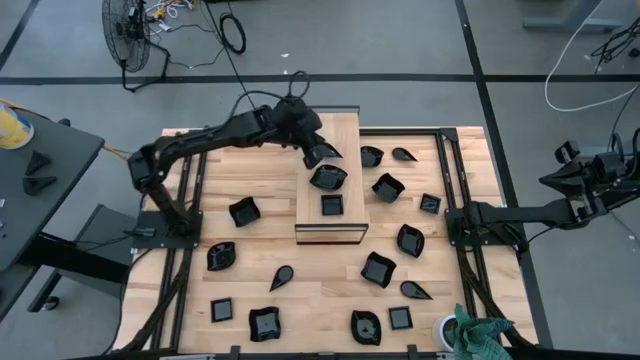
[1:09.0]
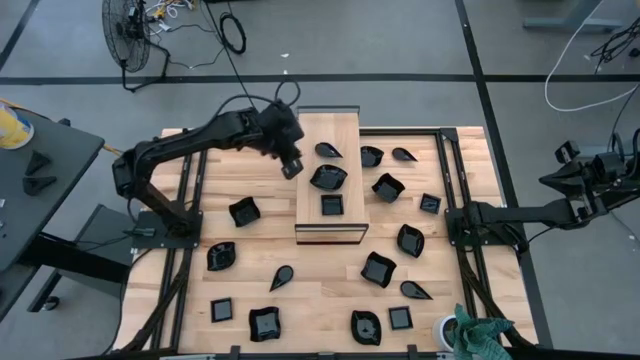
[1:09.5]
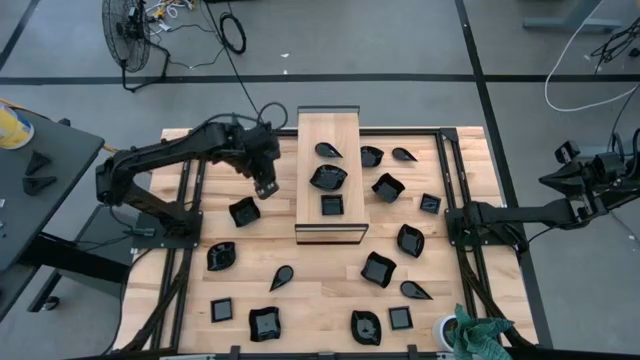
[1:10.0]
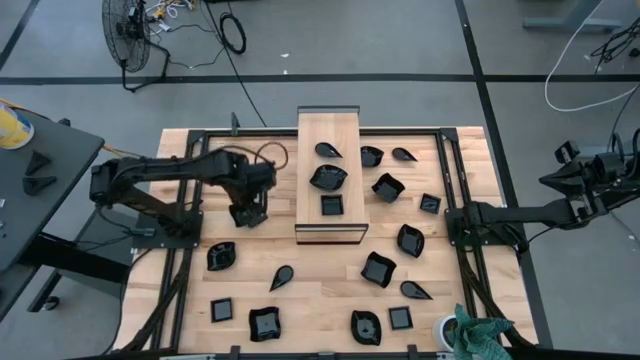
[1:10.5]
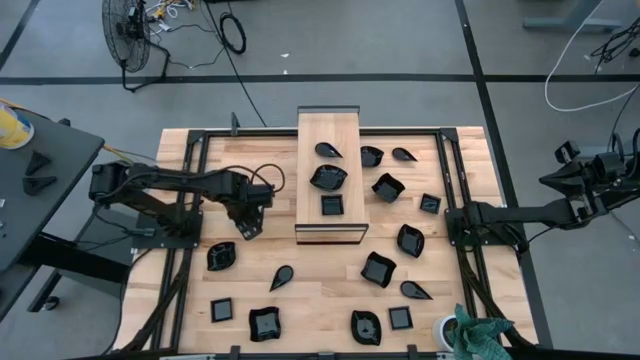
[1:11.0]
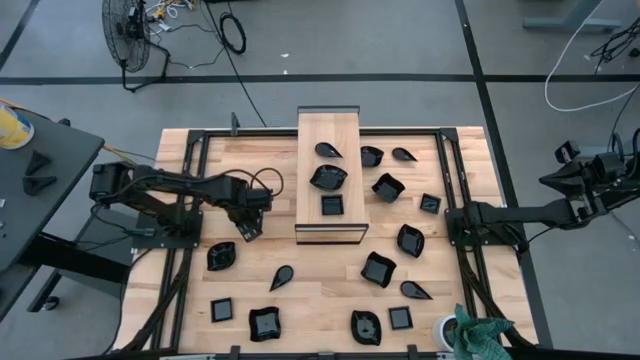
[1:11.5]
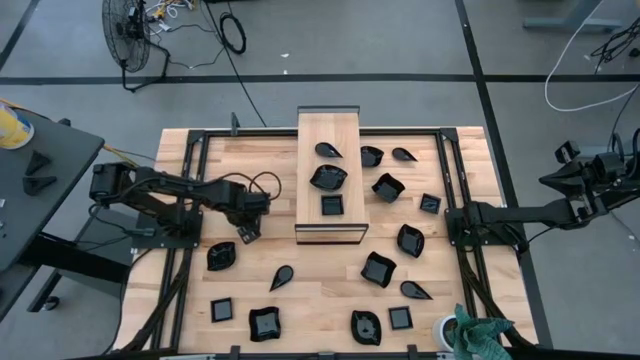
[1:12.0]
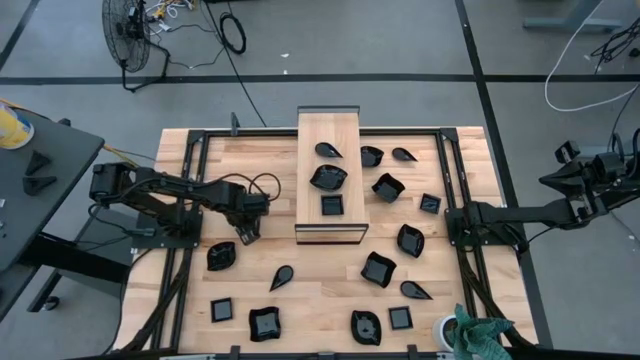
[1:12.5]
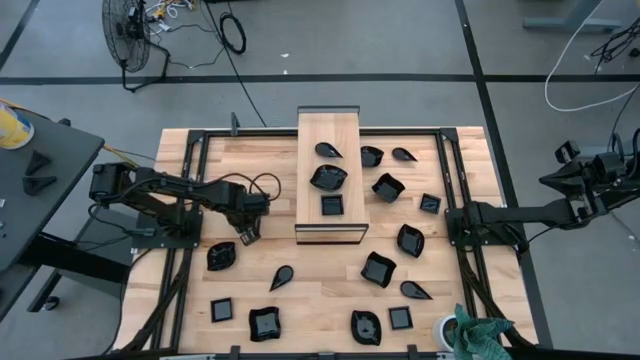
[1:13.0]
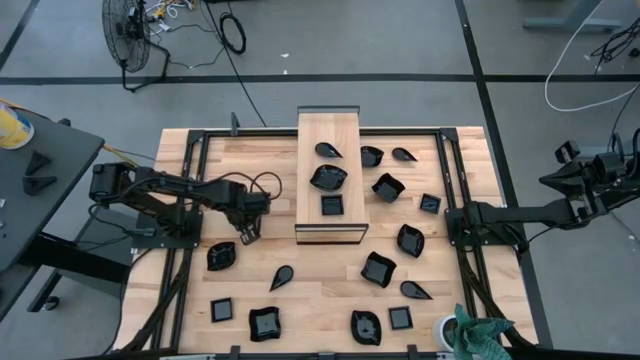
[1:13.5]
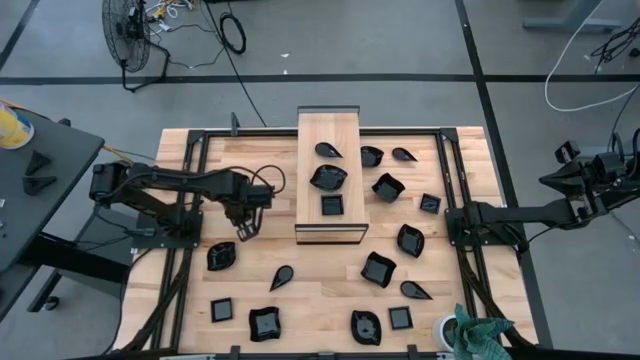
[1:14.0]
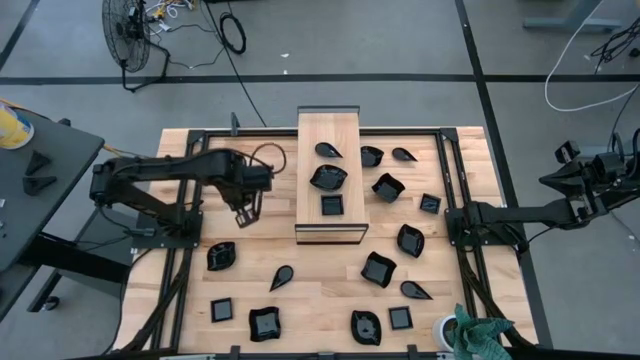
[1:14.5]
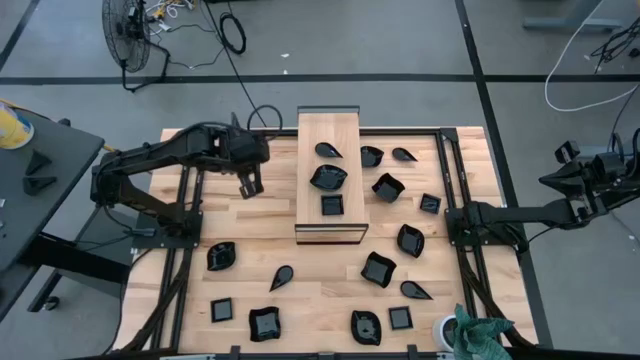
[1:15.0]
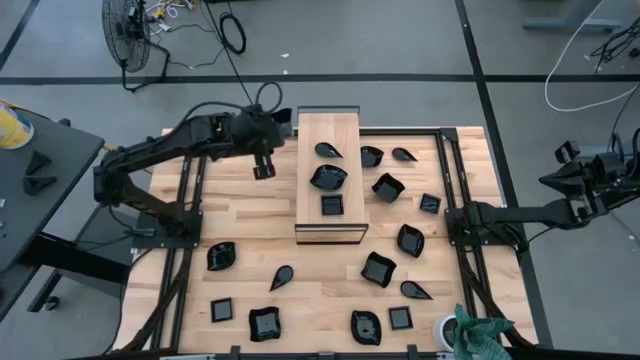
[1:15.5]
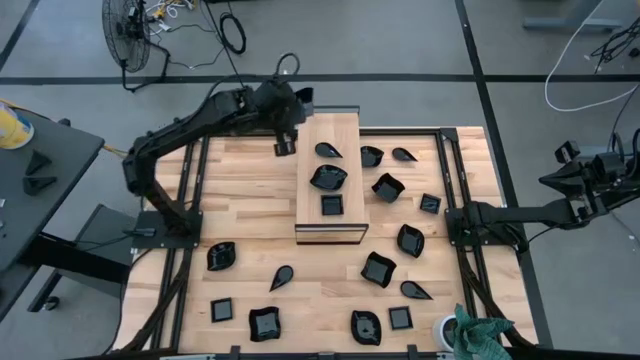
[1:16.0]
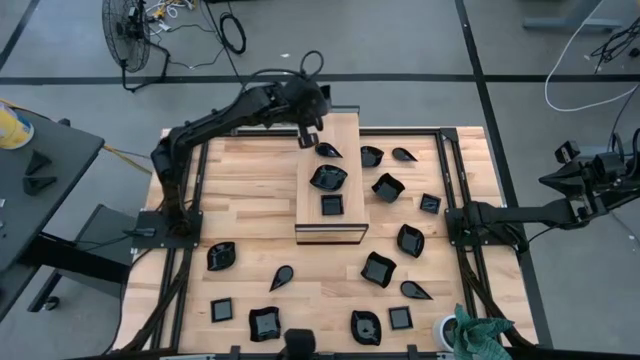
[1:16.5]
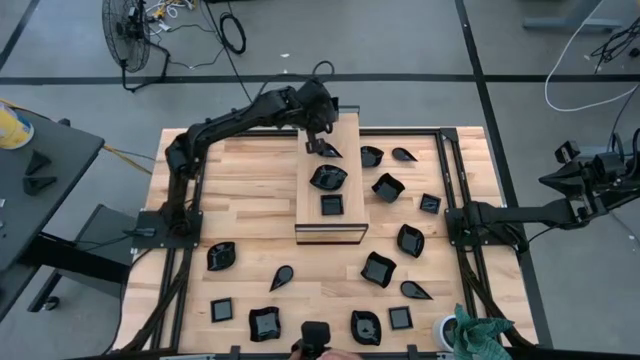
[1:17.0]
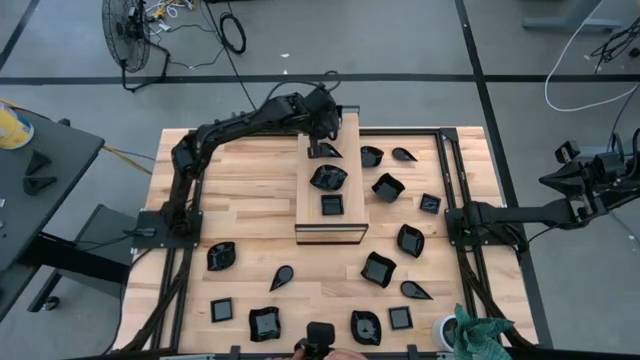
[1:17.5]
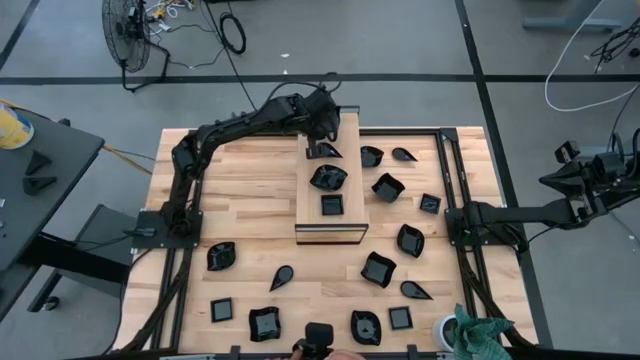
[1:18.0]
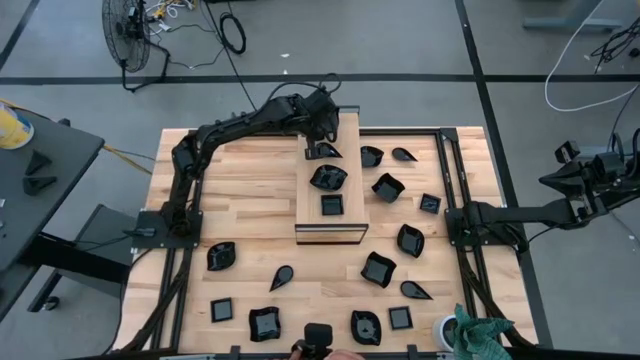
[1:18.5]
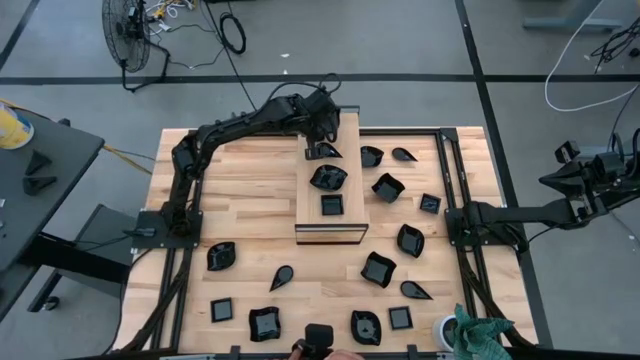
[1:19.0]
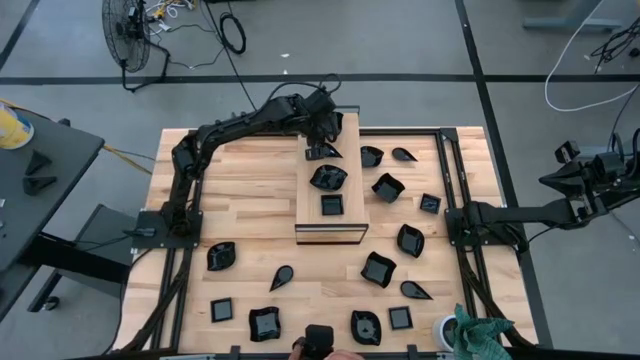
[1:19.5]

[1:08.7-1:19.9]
Task: Pick & Place Mini shaped plates
Put the distorted square plate on the shelf

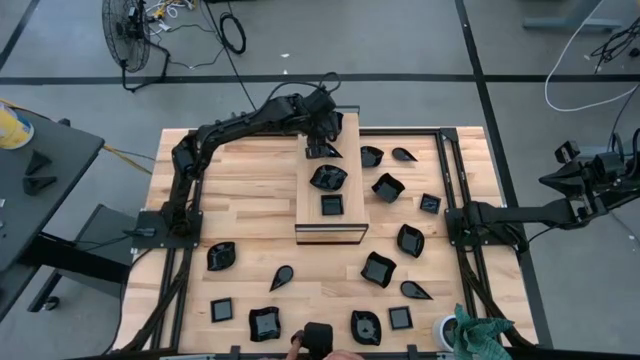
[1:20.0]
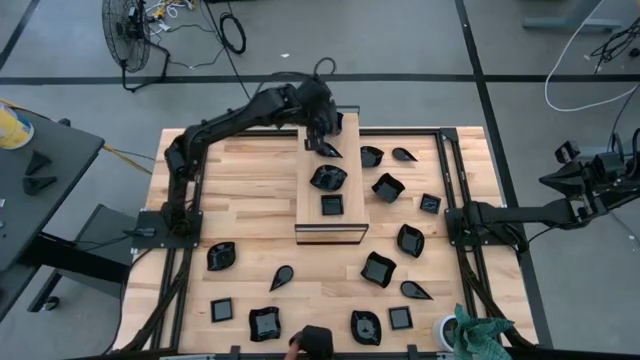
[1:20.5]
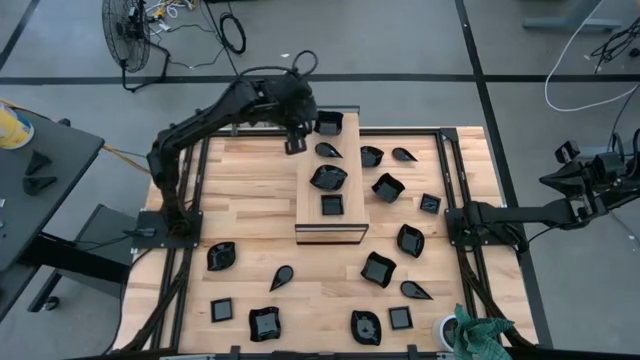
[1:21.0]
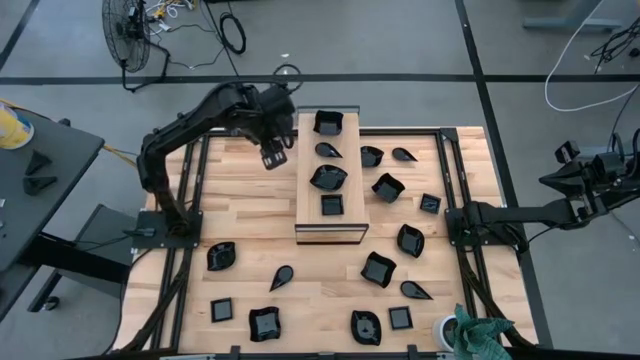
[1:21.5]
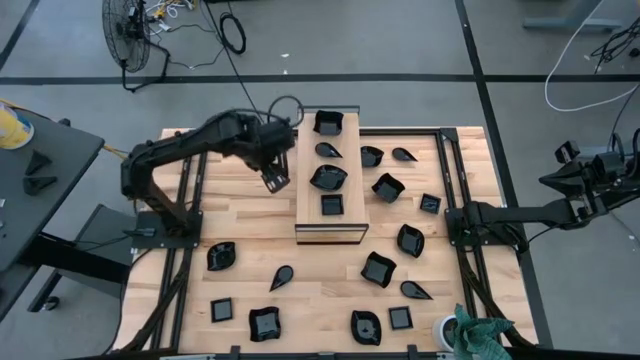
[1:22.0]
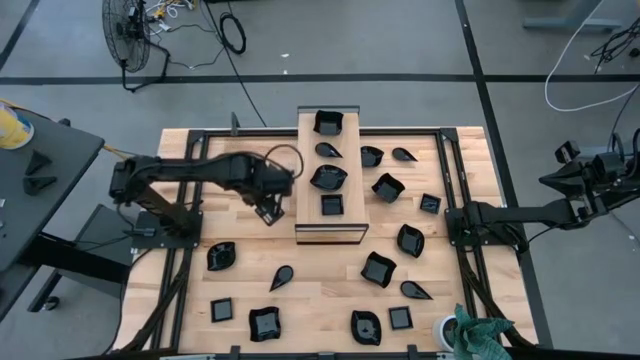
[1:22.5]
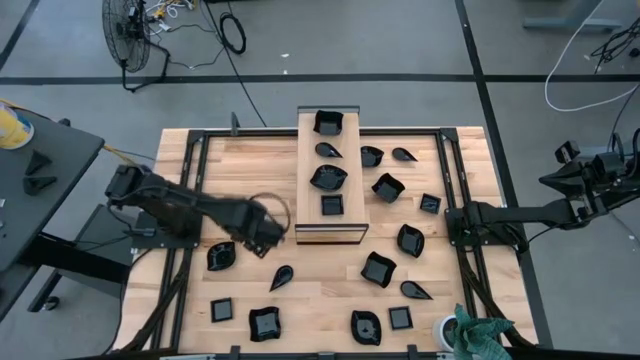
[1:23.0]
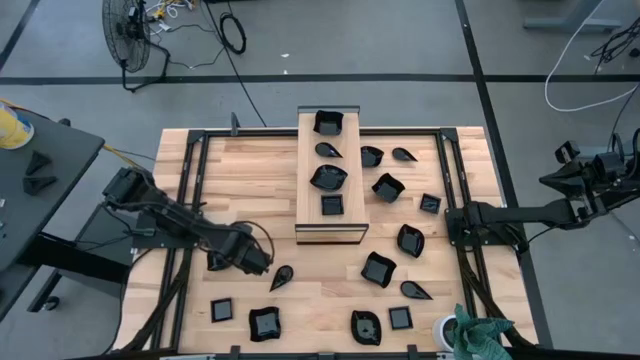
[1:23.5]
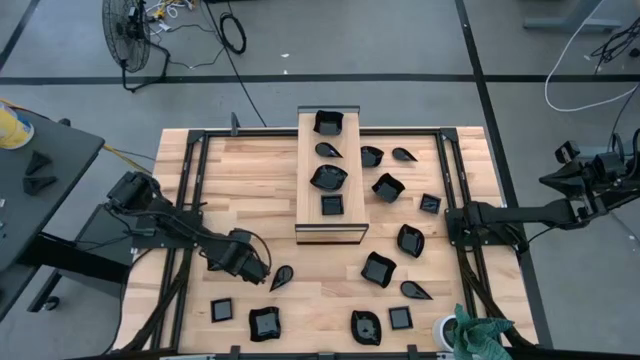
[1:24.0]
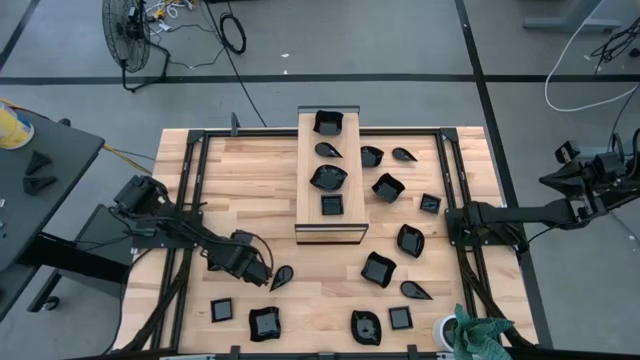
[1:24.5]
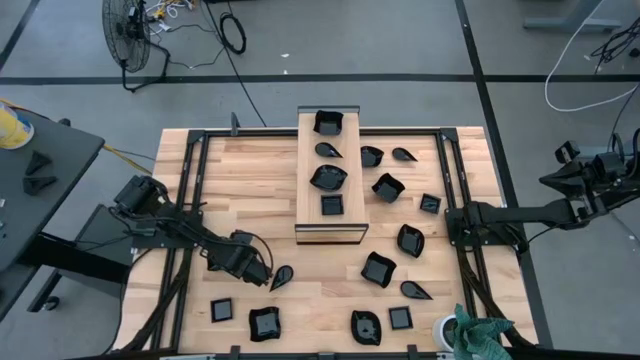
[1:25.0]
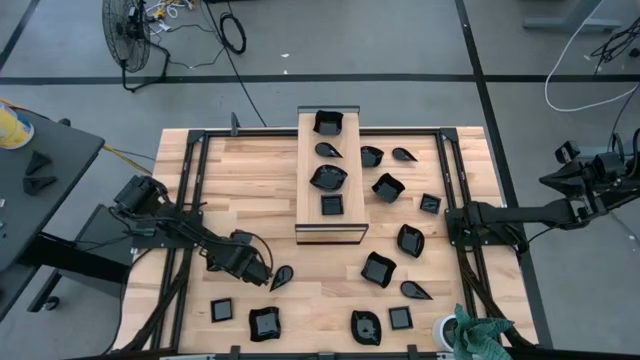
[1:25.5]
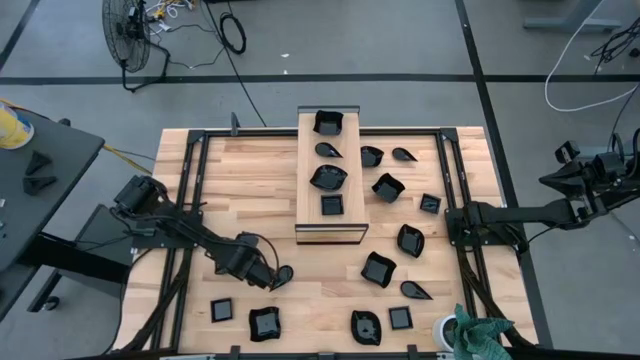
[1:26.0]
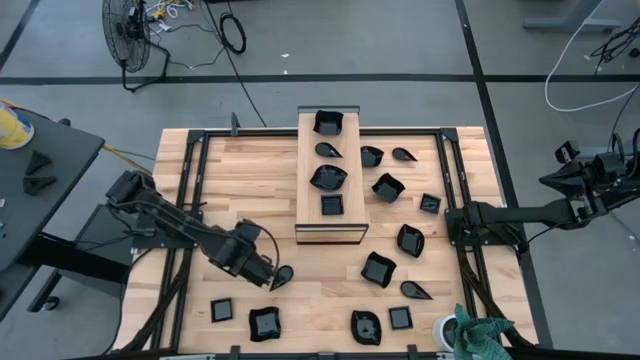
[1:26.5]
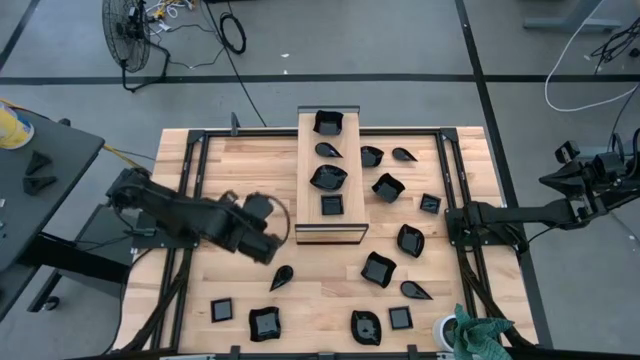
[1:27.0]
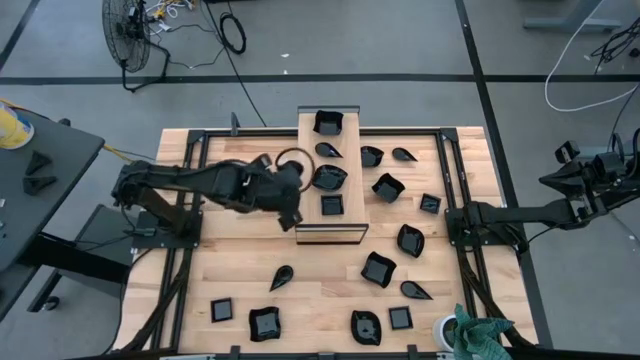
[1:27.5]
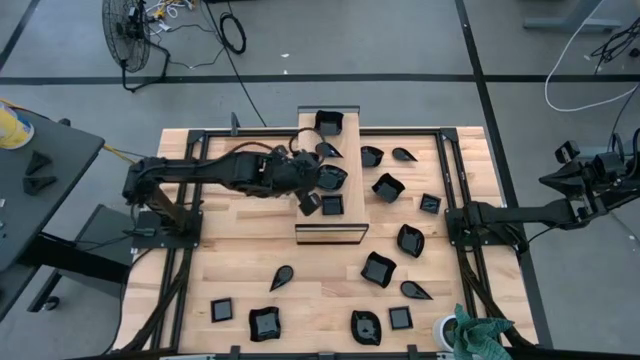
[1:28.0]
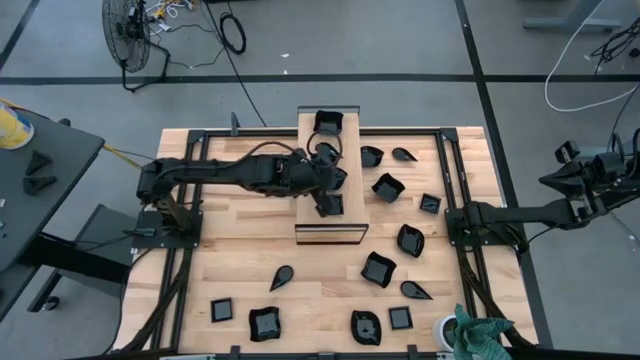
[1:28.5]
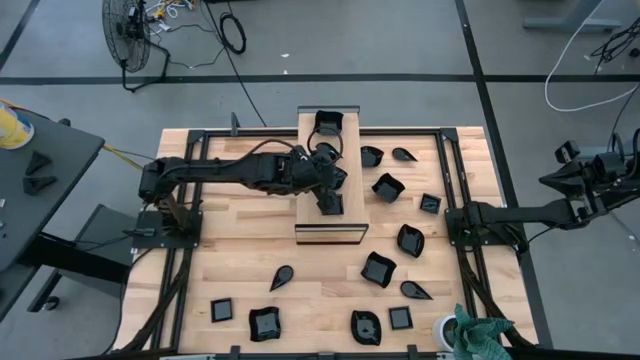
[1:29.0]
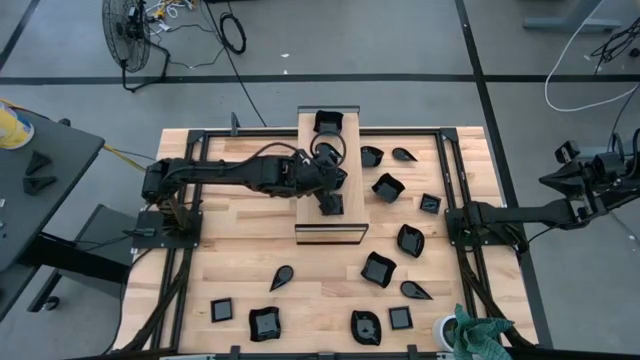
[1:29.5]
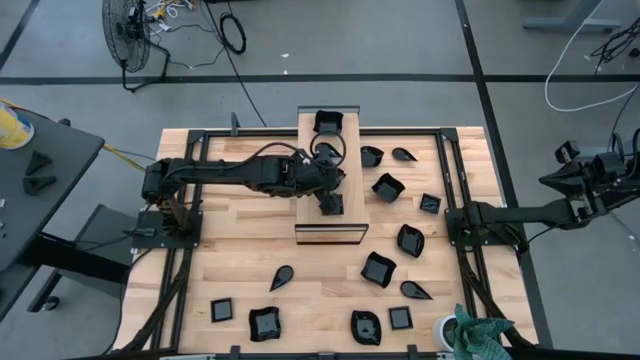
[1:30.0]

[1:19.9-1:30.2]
Stack the leaf-shaped plate on top of the leaf-shaped plate on the shelf
